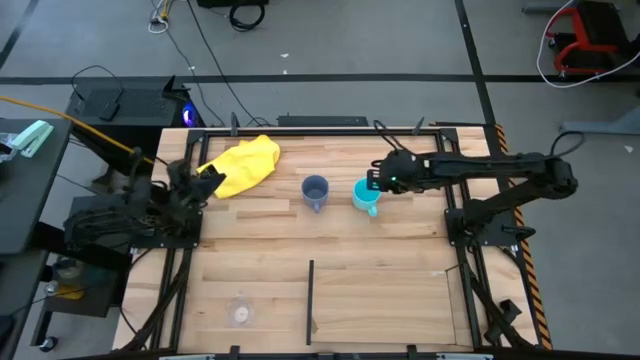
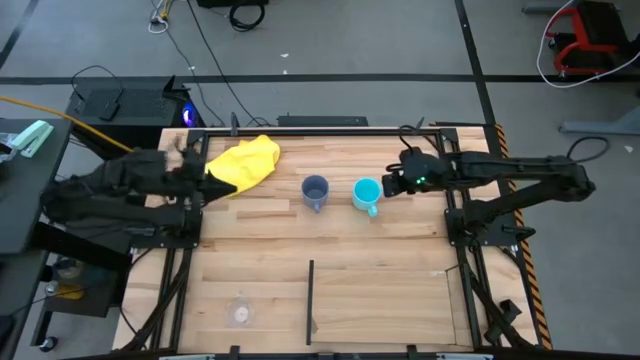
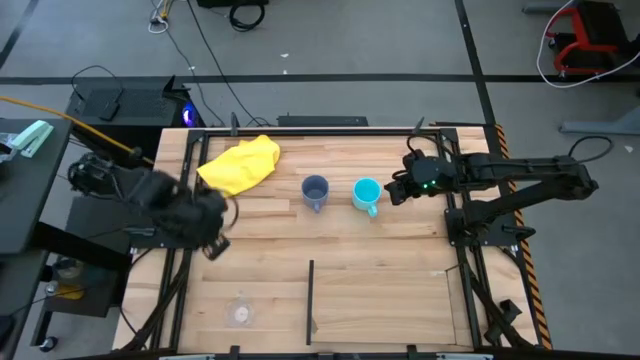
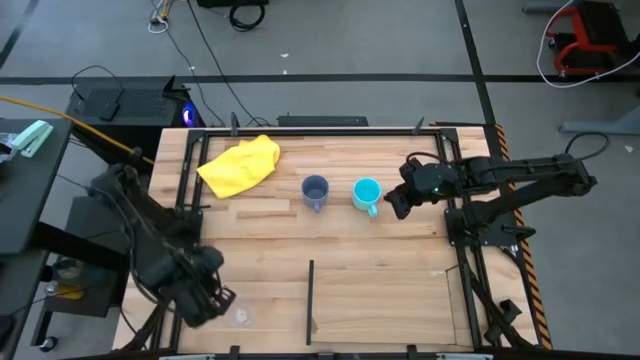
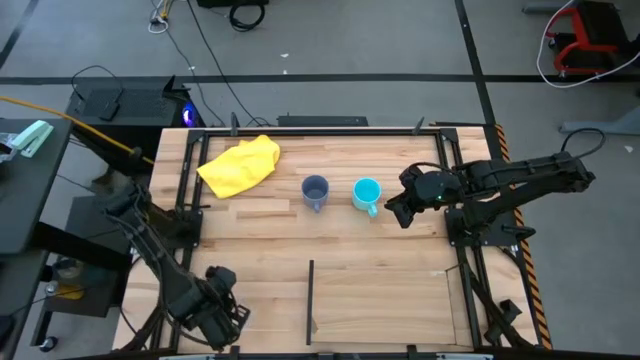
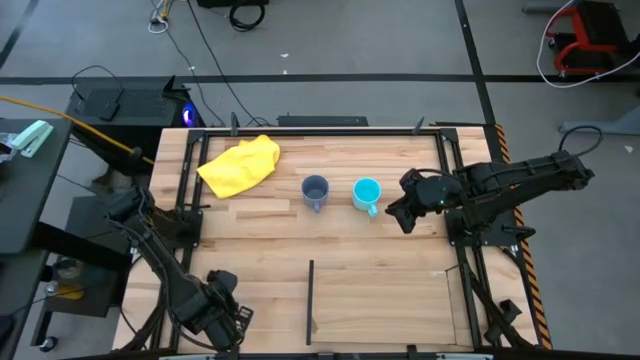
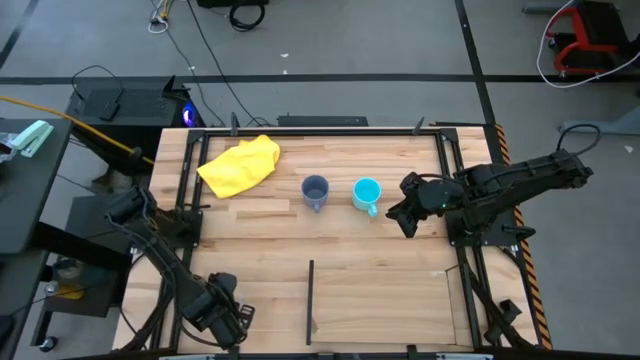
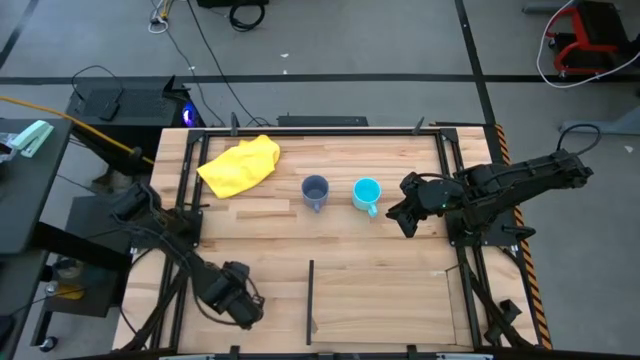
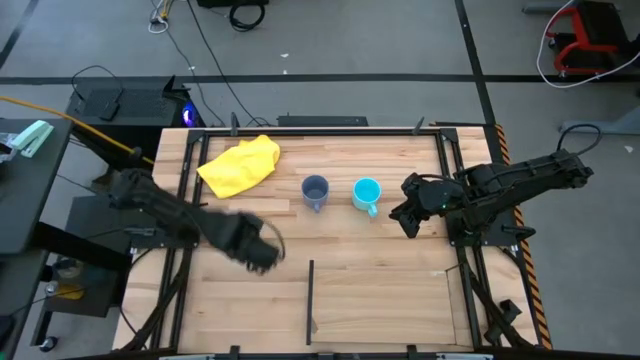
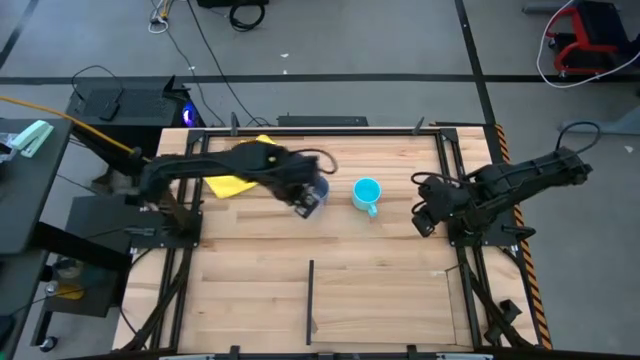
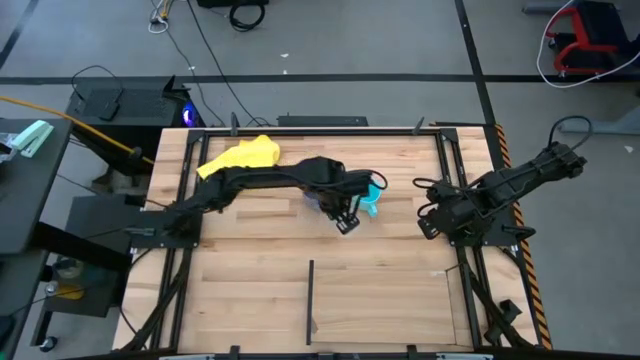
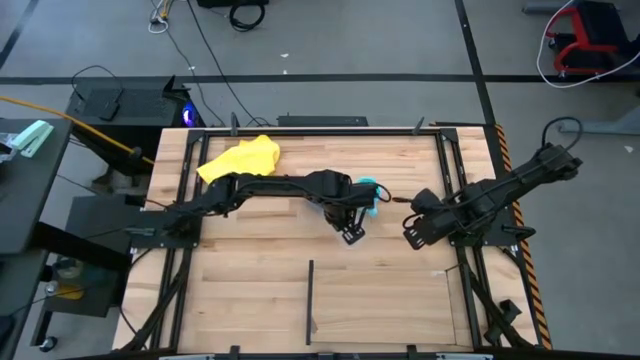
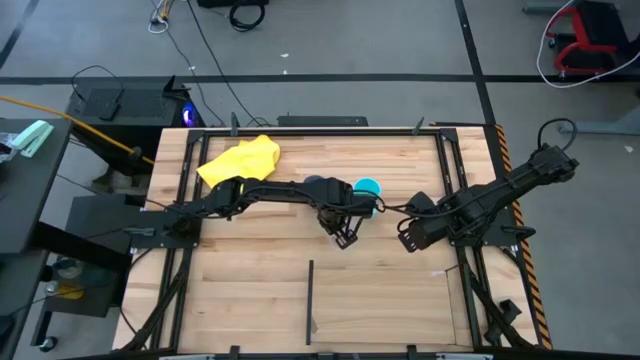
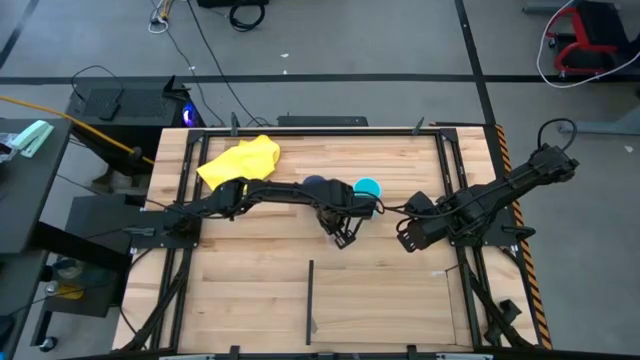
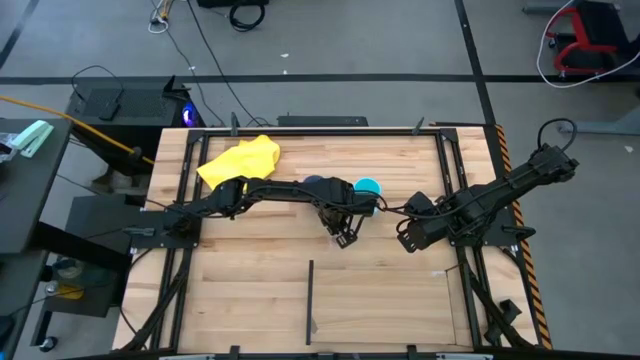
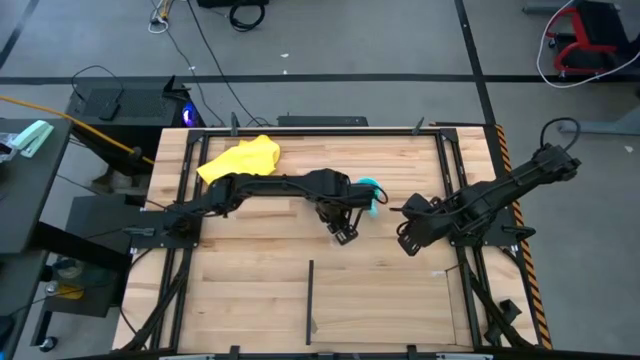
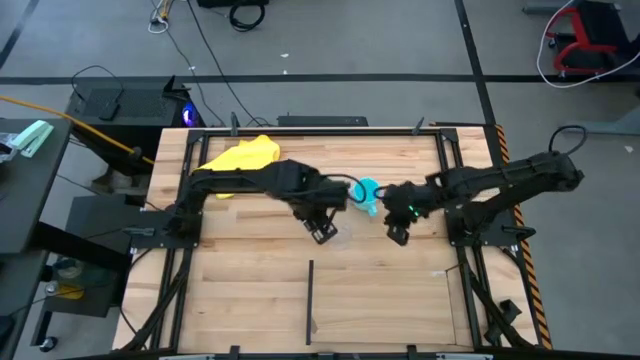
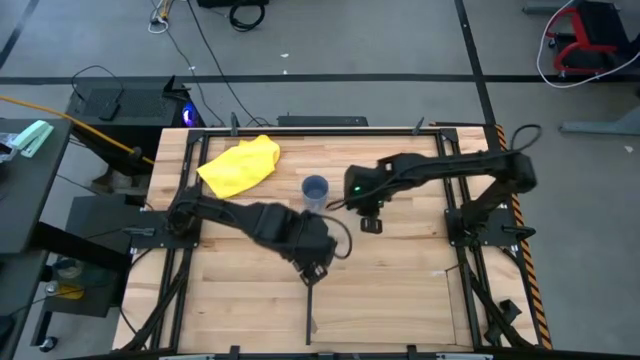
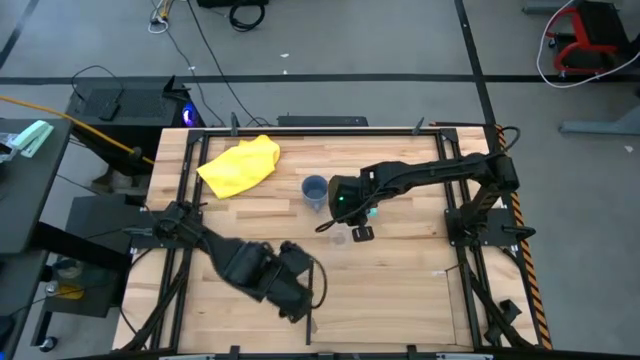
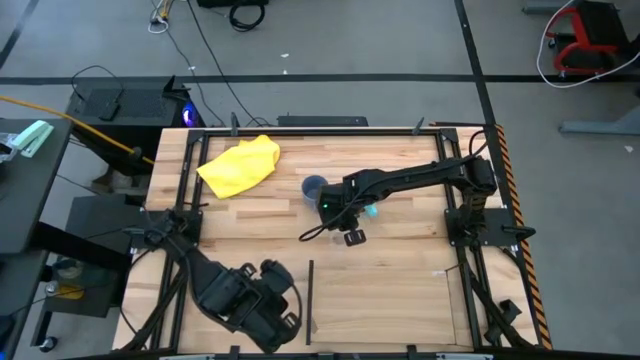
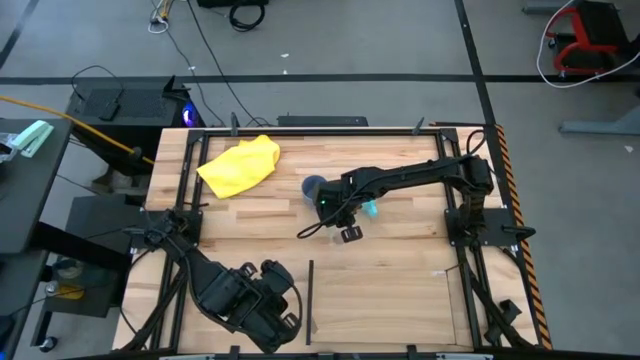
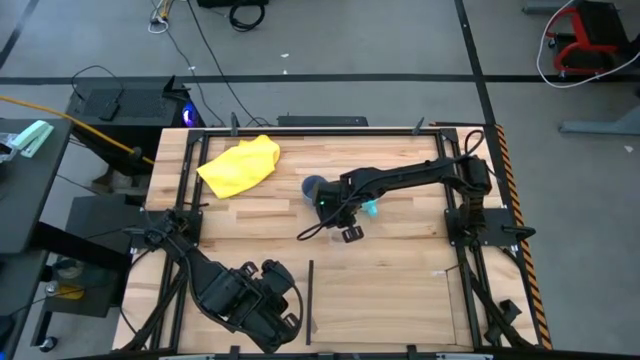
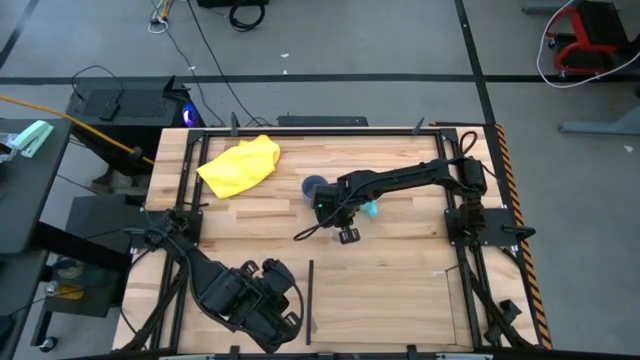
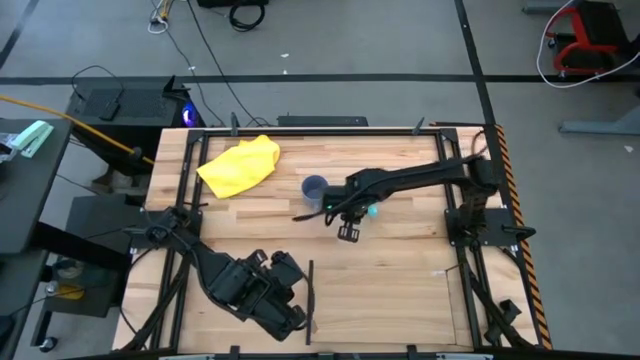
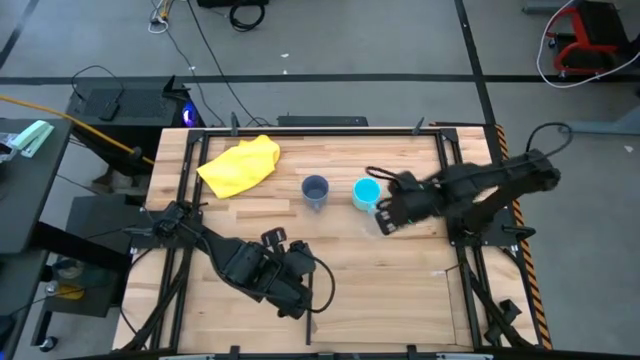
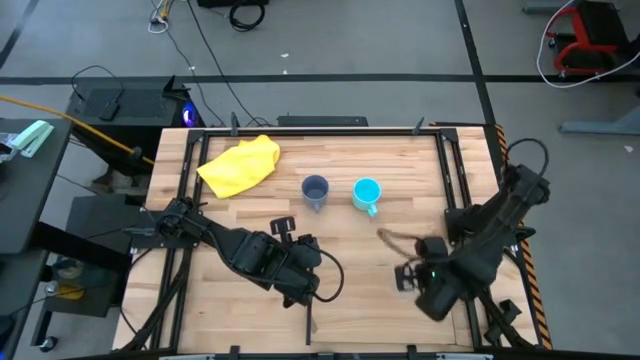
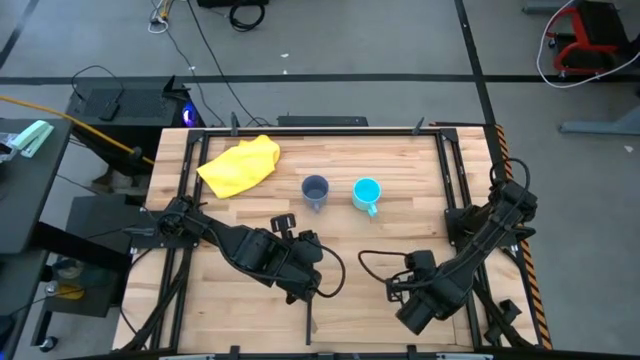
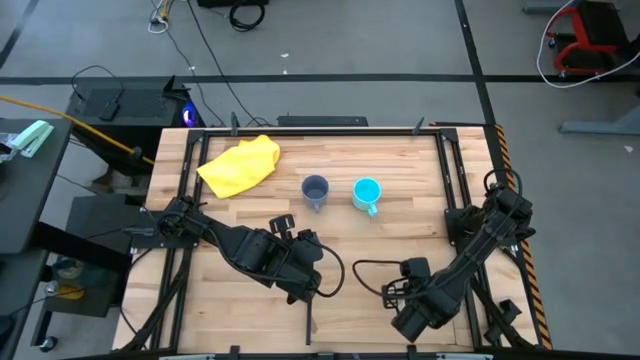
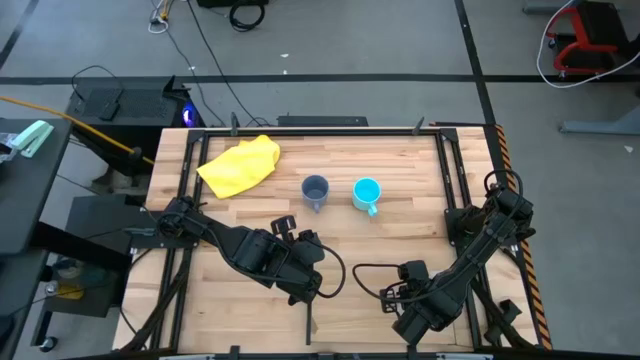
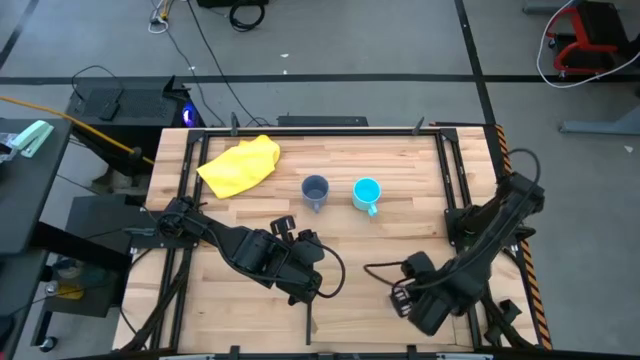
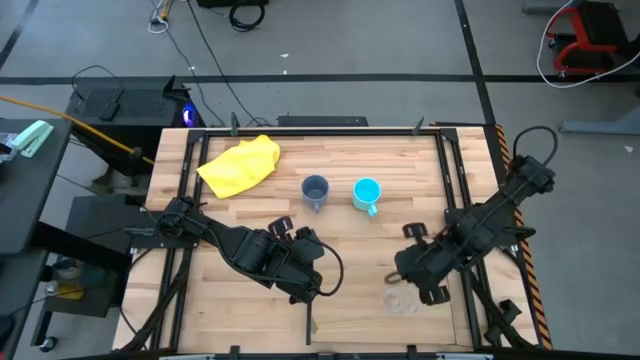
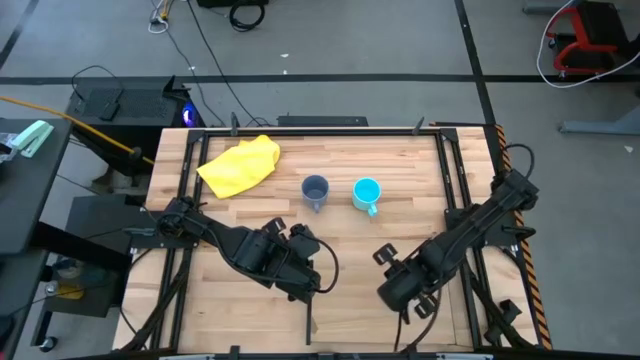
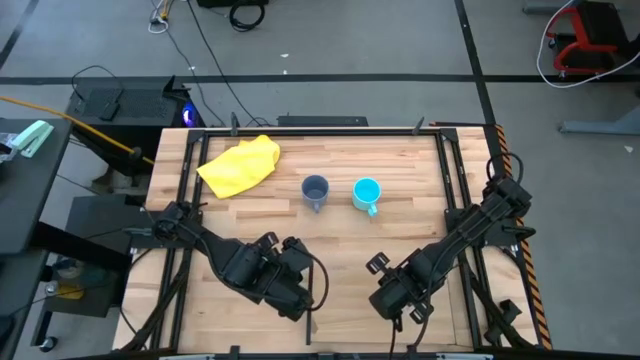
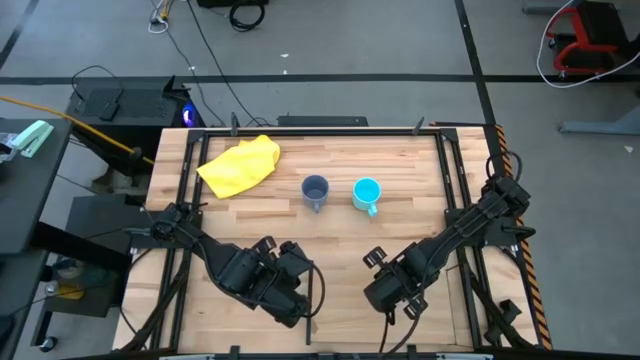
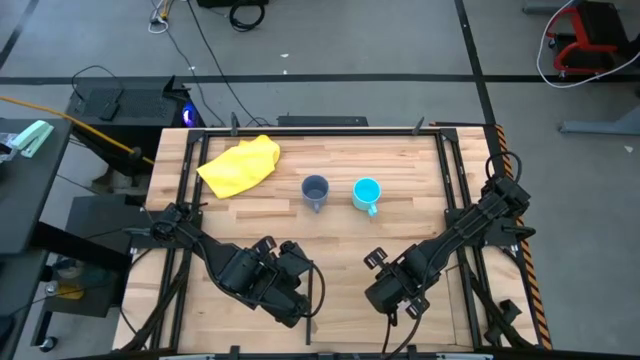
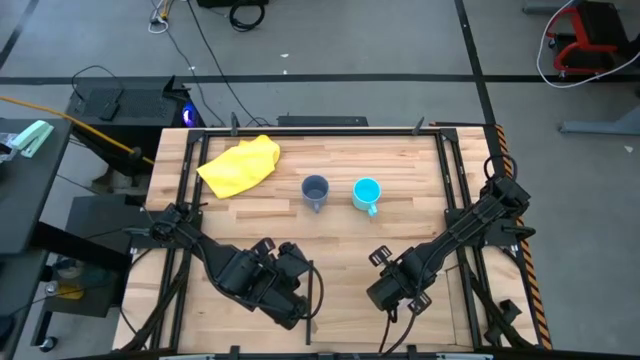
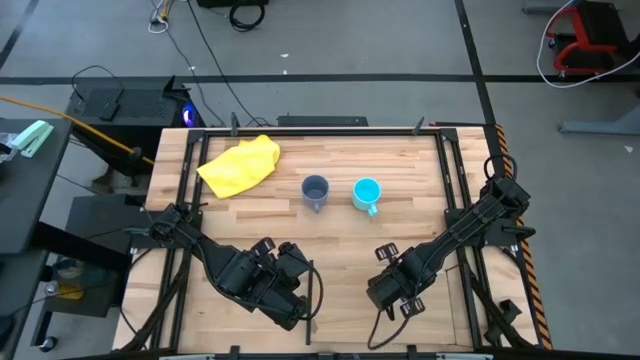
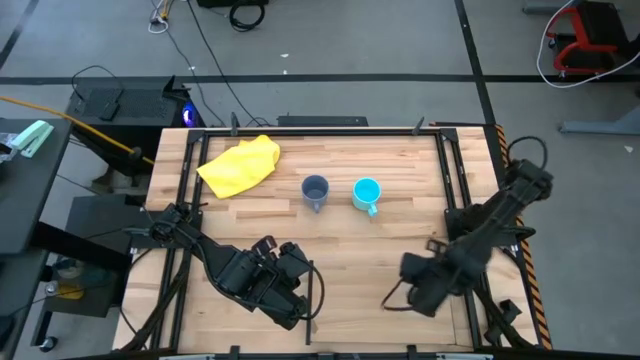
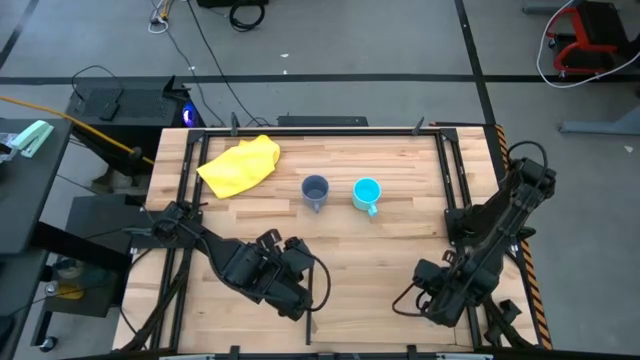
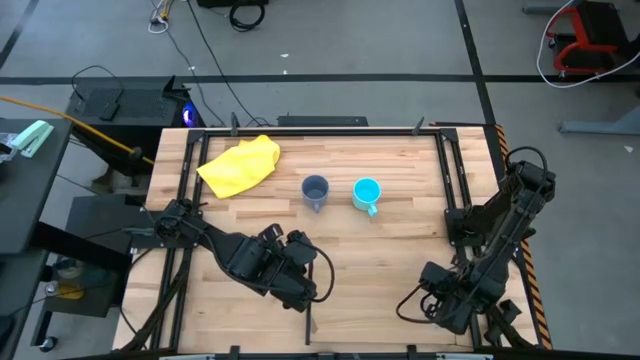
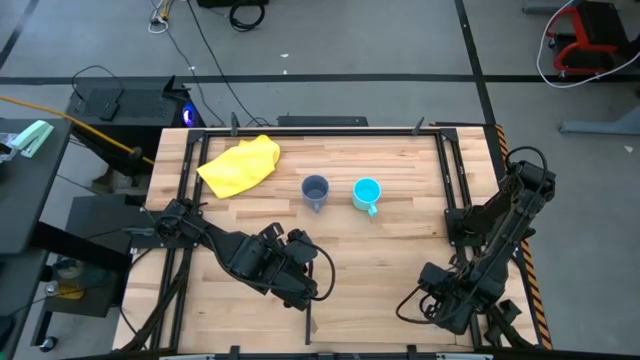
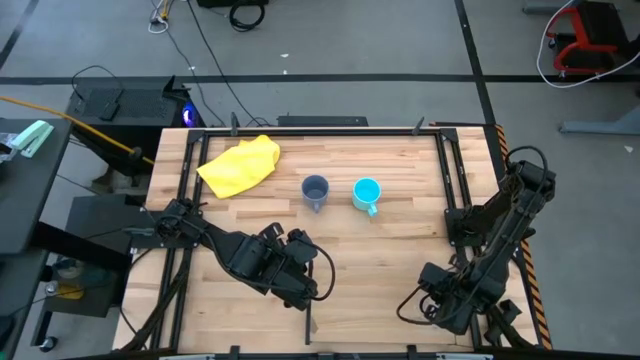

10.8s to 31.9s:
Task: Stack small to large cups/mugs on shelf
Put the transparent mug on the shelf
